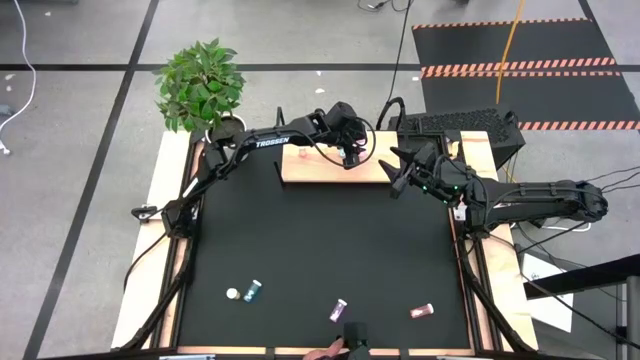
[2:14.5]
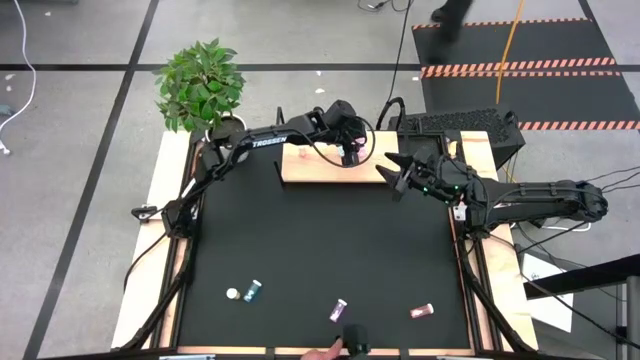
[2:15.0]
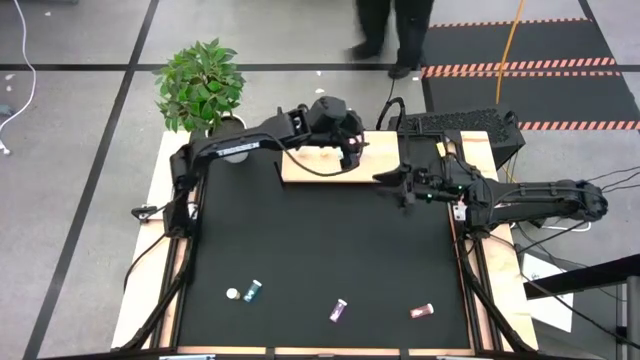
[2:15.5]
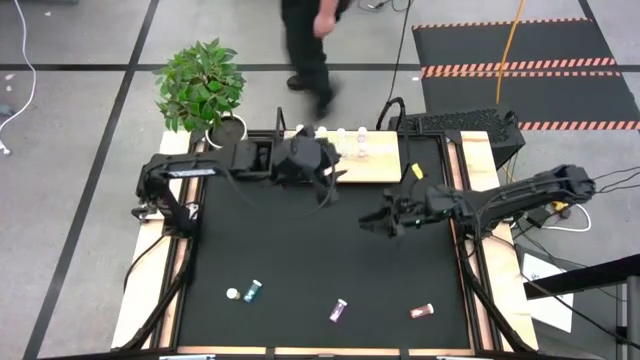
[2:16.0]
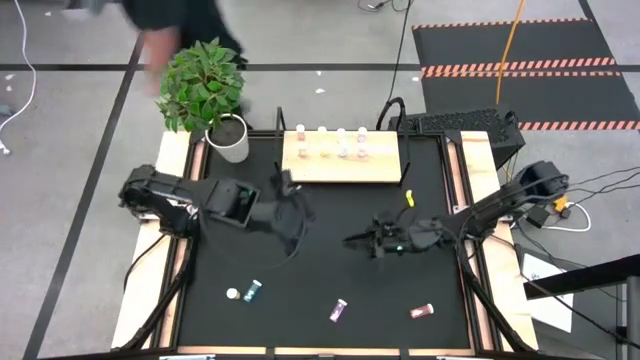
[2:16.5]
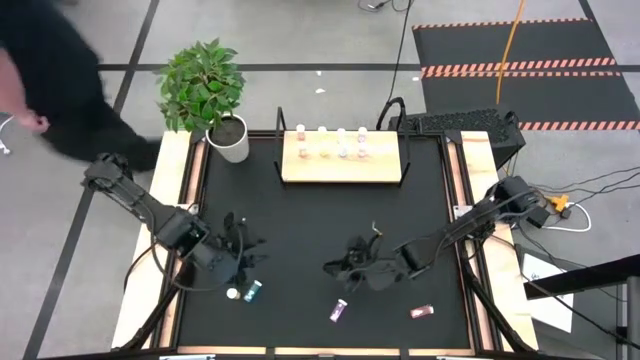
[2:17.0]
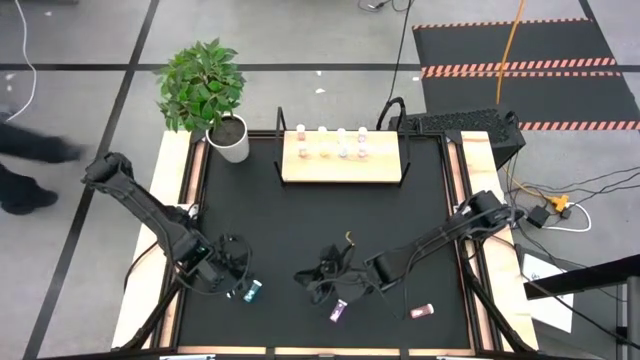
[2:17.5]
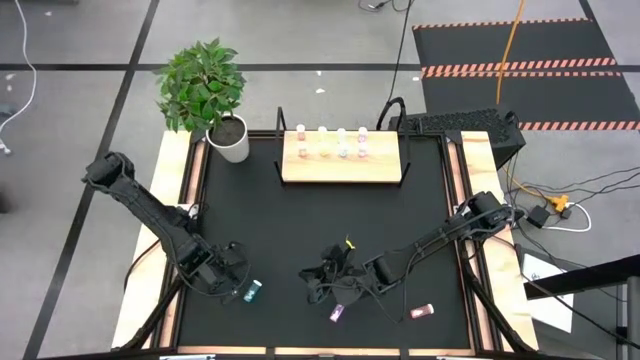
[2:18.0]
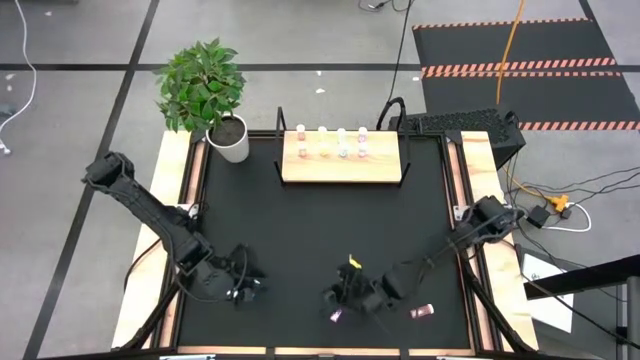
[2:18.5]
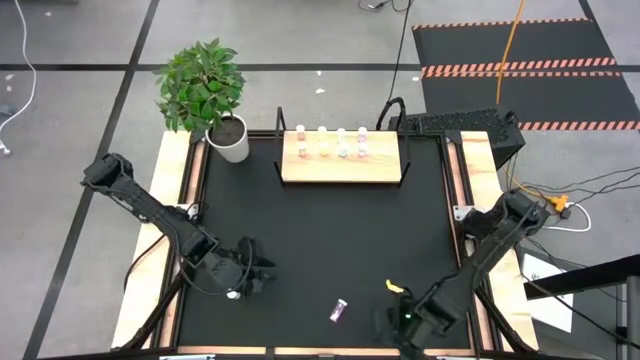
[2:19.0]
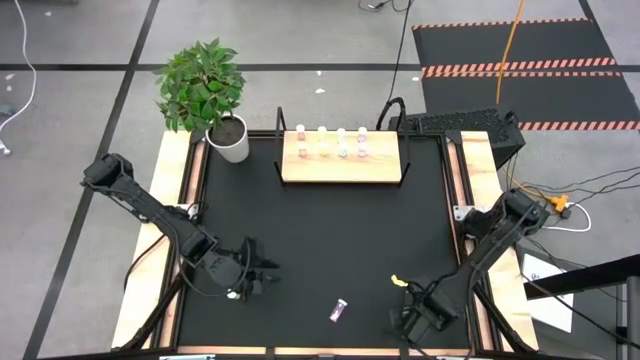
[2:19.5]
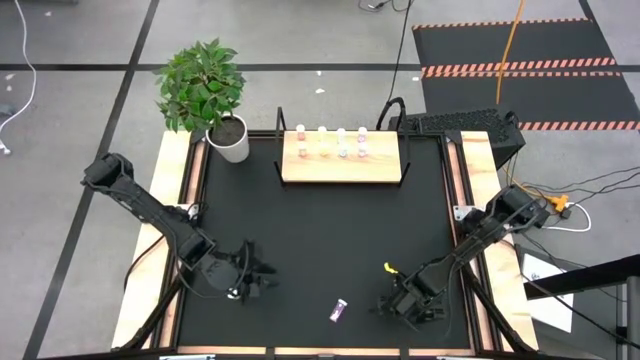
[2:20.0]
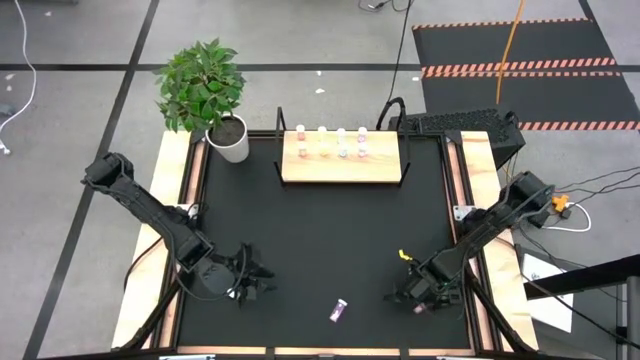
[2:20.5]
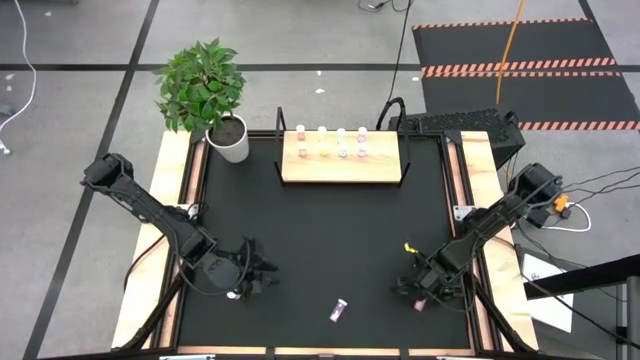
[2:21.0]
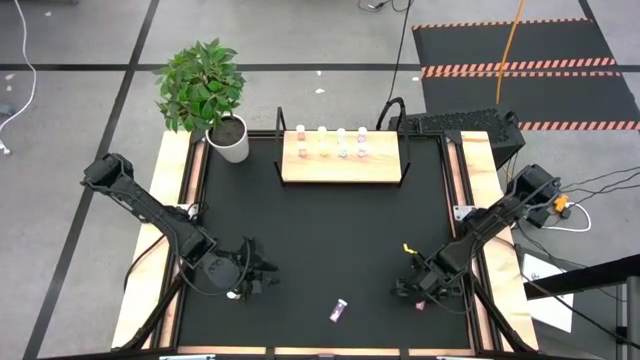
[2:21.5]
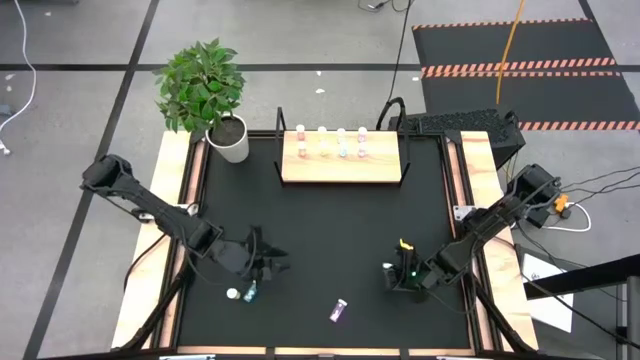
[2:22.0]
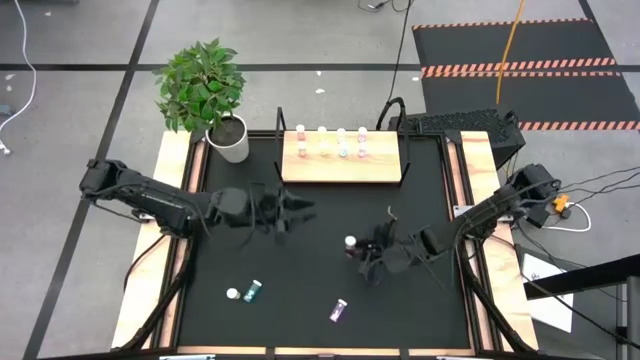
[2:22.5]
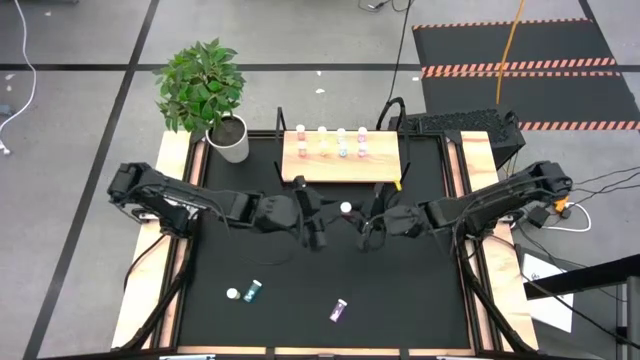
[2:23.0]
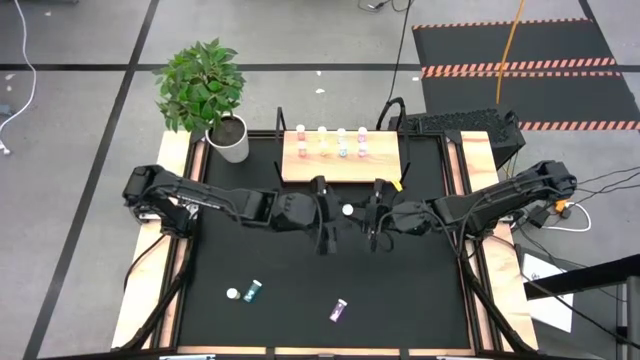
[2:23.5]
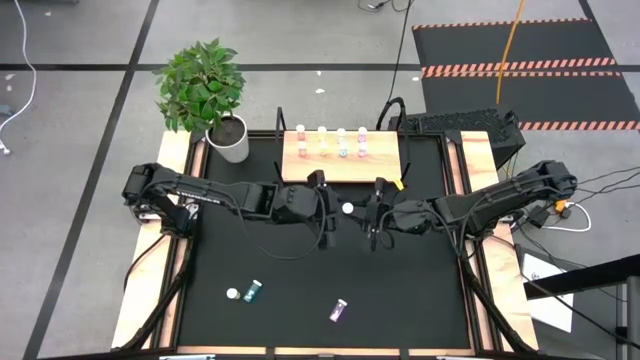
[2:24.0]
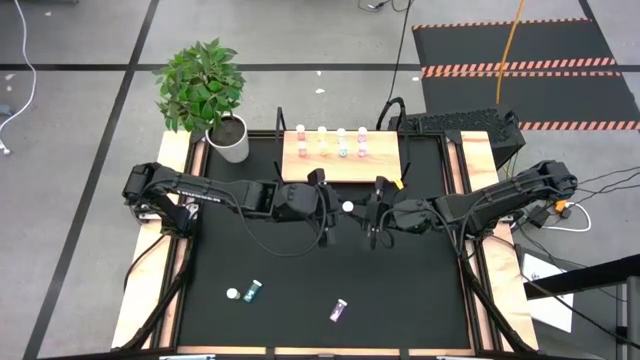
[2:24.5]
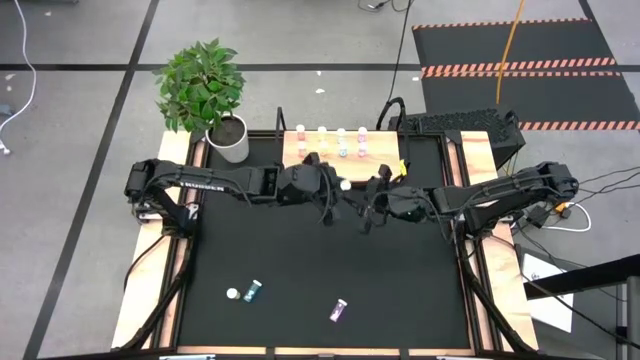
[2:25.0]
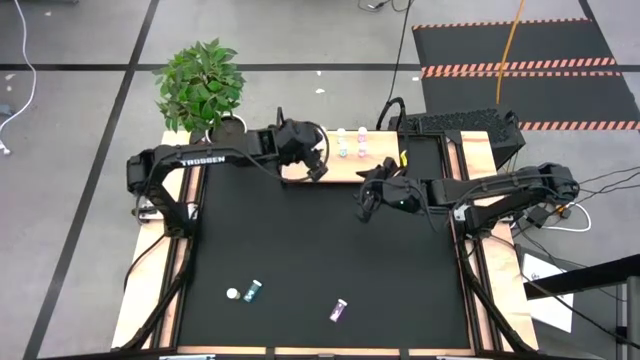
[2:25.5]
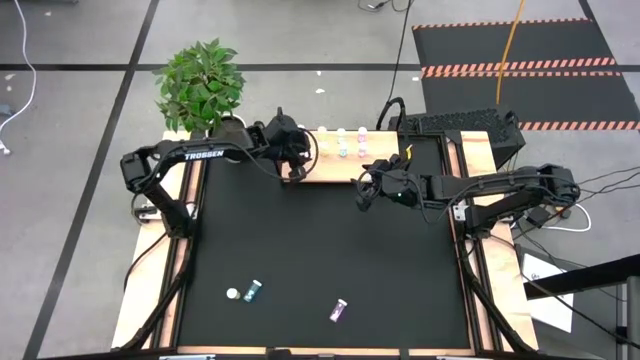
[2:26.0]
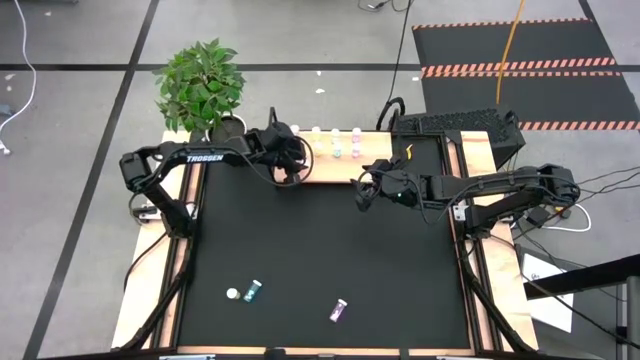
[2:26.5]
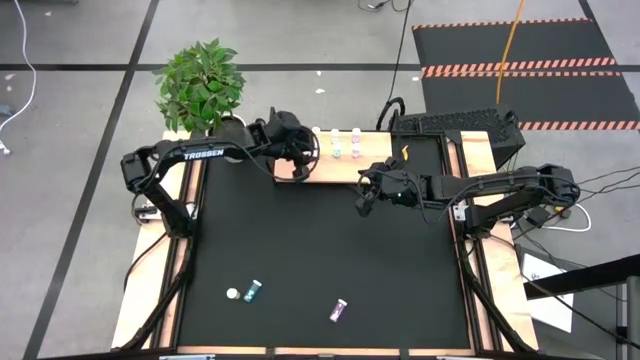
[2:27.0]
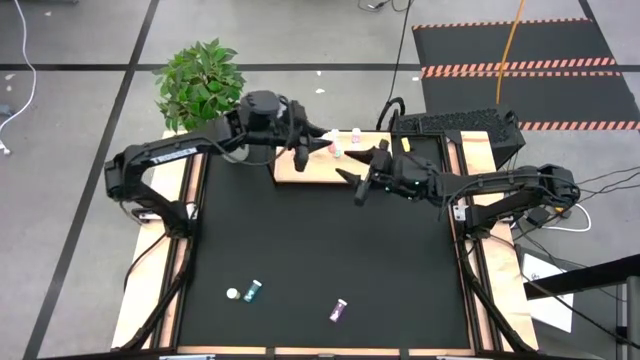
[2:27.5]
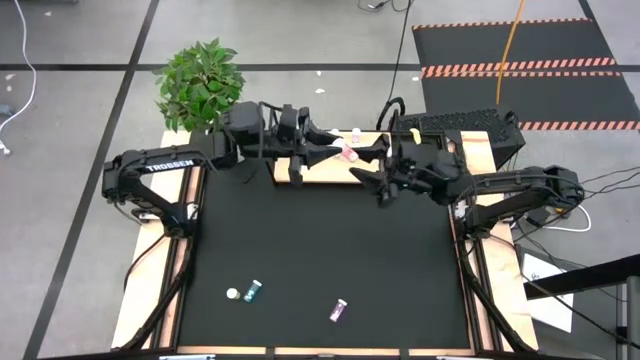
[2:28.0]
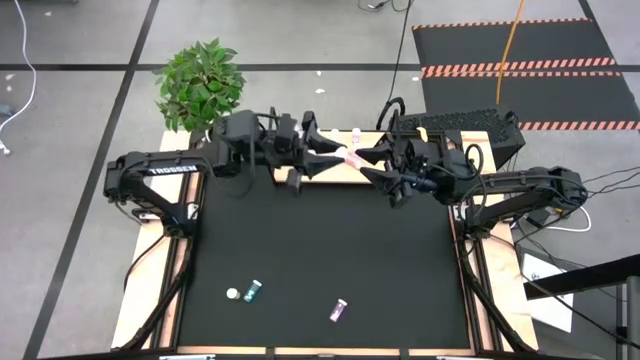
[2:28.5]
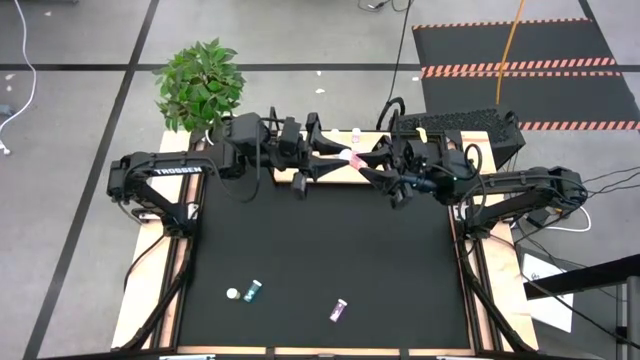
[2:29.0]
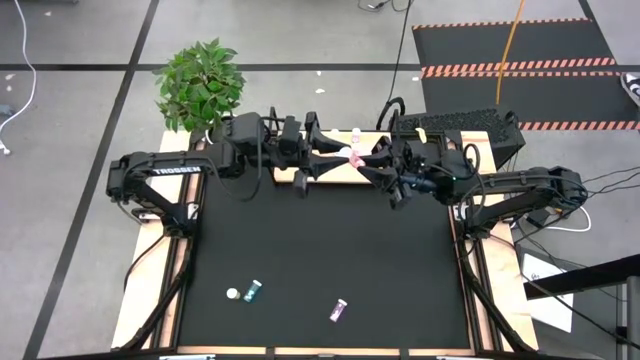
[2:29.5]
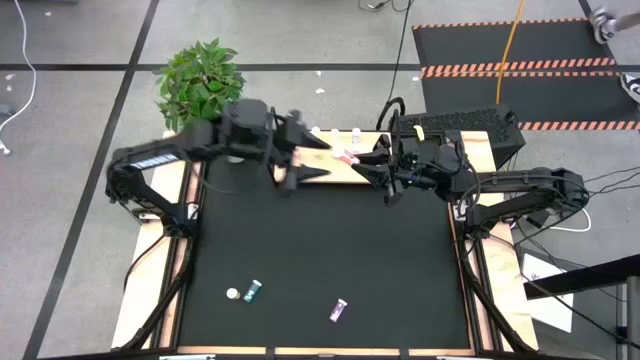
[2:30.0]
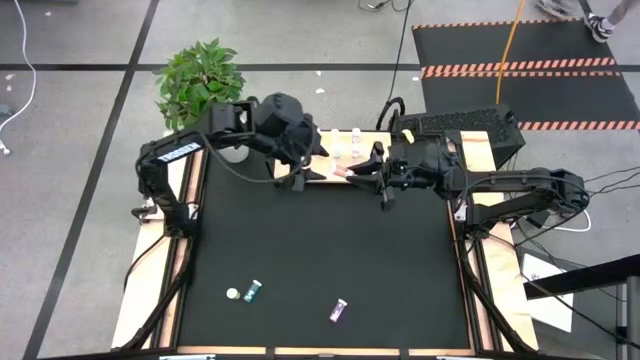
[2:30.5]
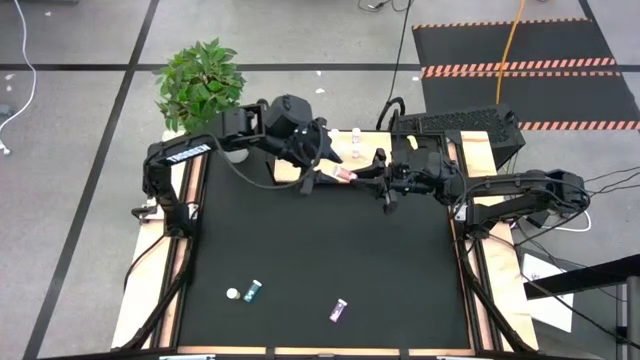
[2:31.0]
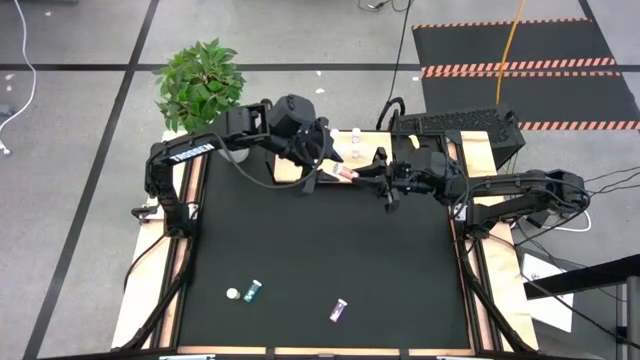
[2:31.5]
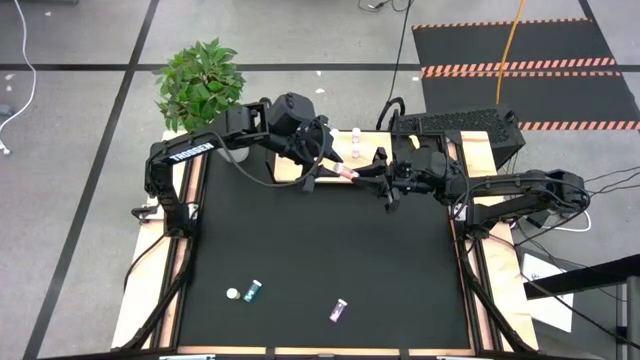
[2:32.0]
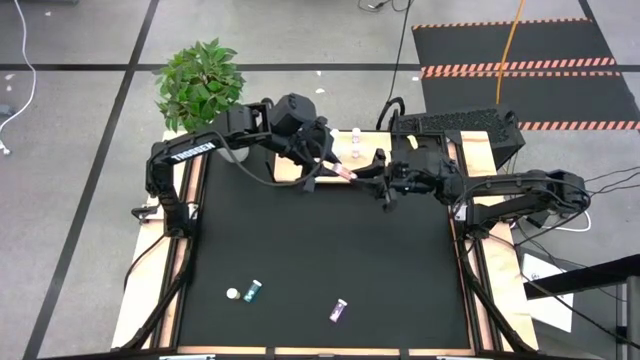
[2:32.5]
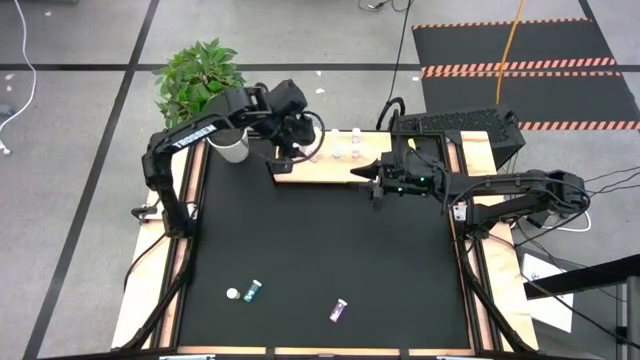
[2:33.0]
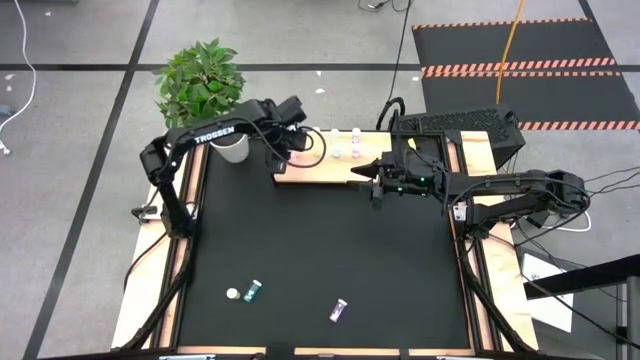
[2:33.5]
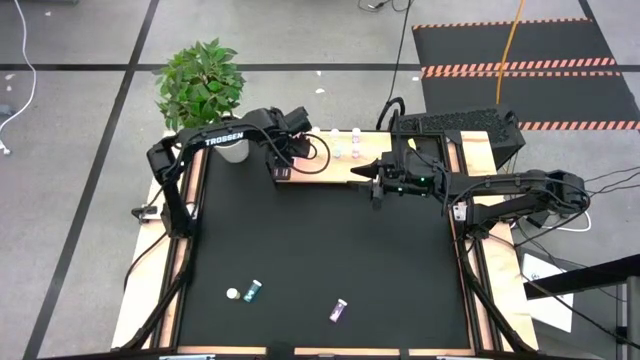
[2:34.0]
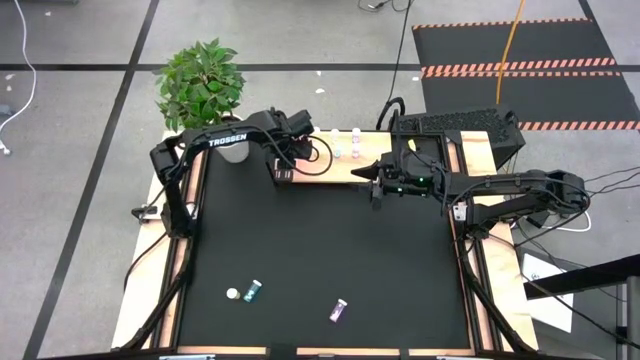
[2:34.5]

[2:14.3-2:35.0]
Task: Pick and place medicine bottles onto shelf by color
Put the pink pill bottle on the shelf aligned with the other pink pill bottles

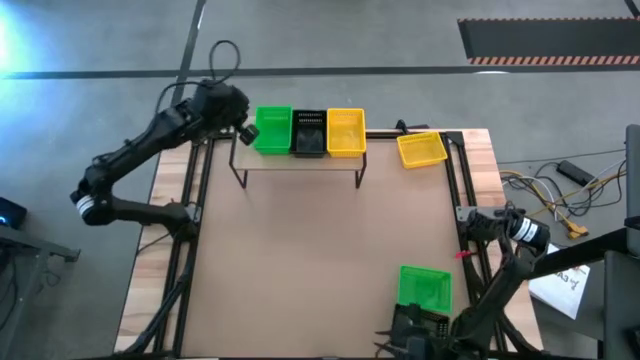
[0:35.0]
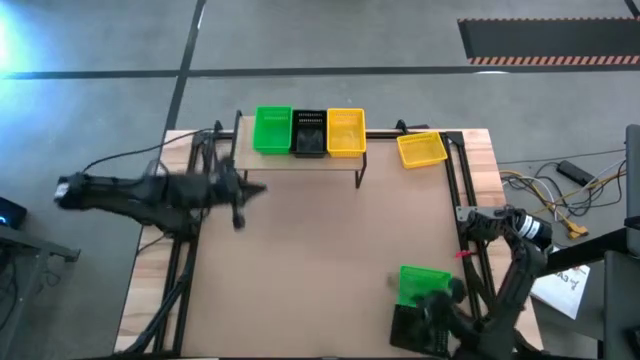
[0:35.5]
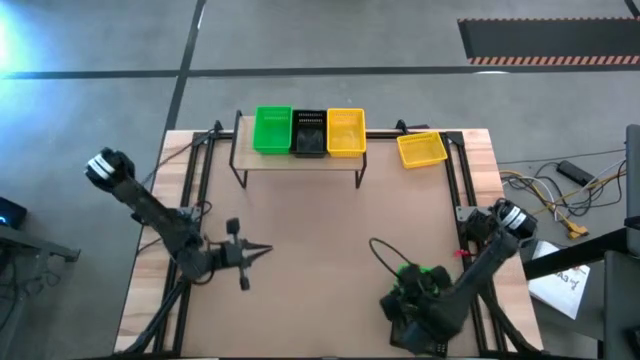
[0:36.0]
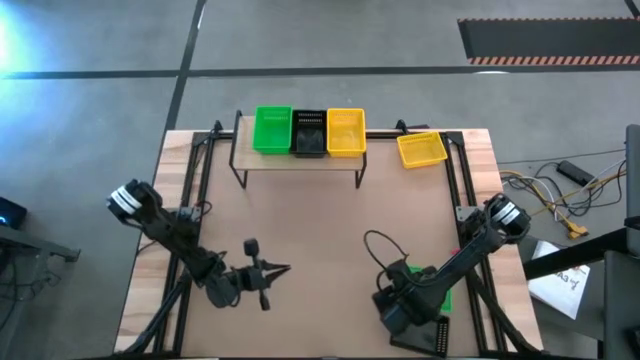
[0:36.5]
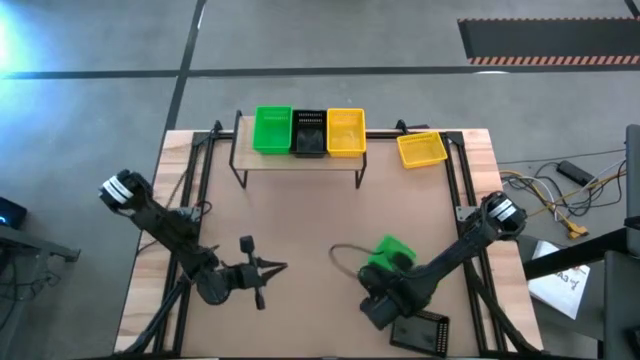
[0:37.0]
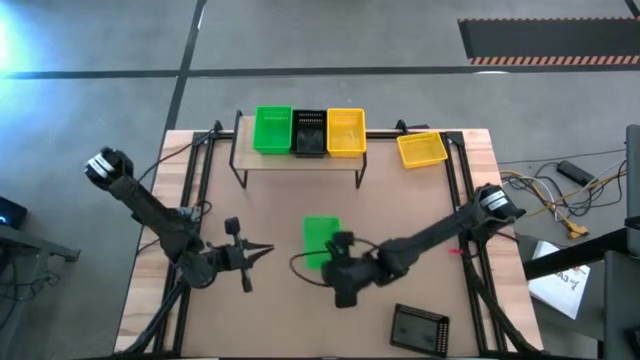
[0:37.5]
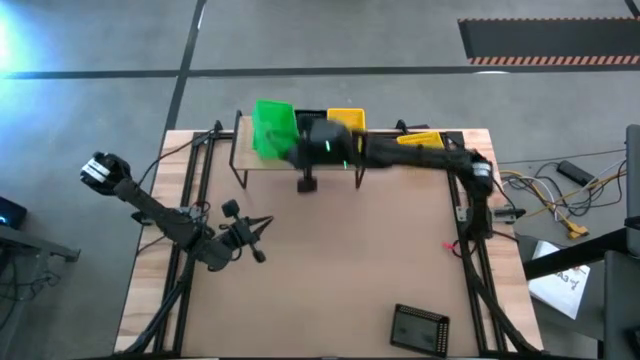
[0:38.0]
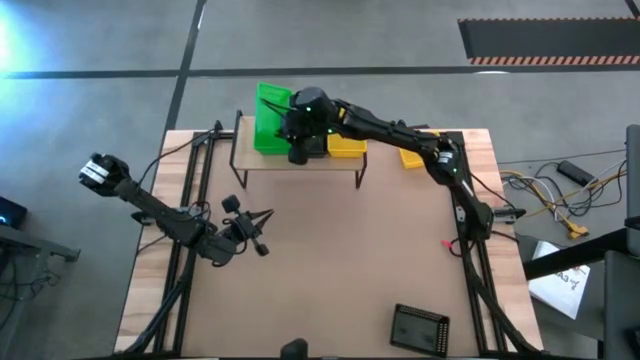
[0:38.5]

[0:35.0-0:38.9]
Task: Stack baskets on shelf by color
Stack the green bin on the green bin on the shelf
